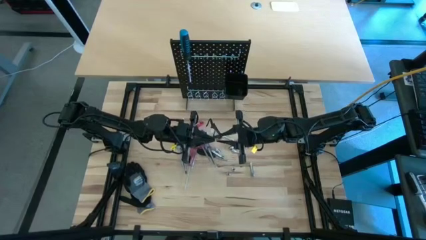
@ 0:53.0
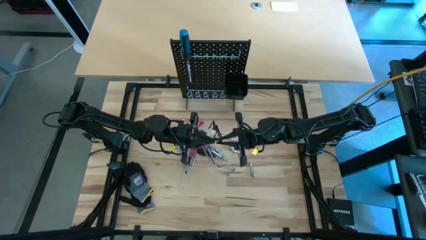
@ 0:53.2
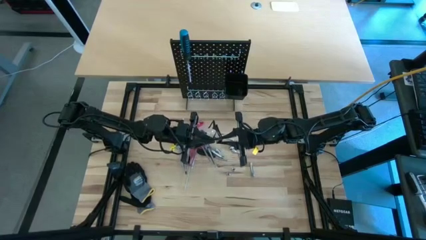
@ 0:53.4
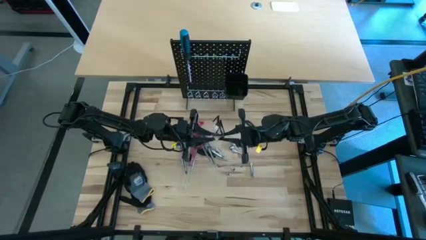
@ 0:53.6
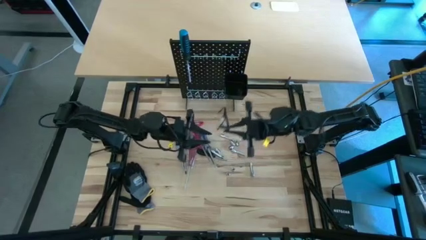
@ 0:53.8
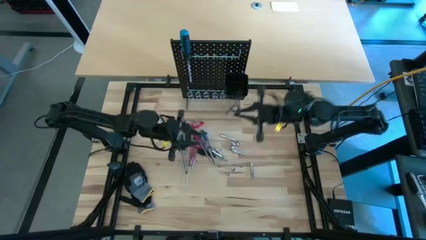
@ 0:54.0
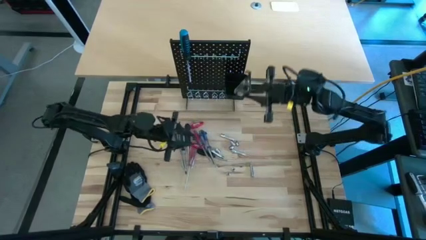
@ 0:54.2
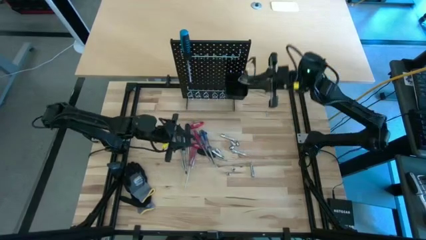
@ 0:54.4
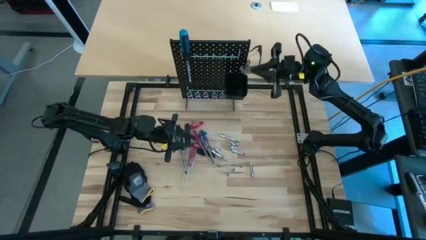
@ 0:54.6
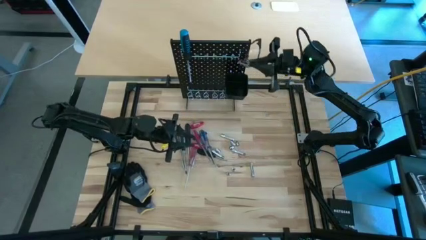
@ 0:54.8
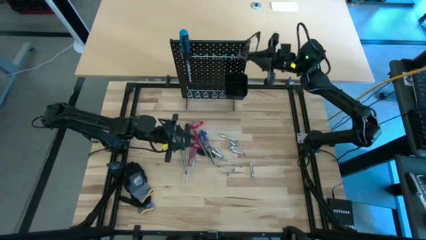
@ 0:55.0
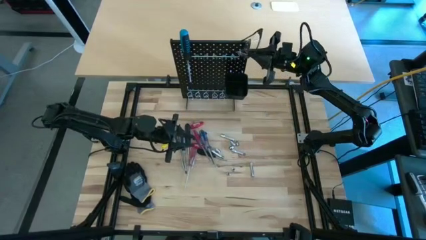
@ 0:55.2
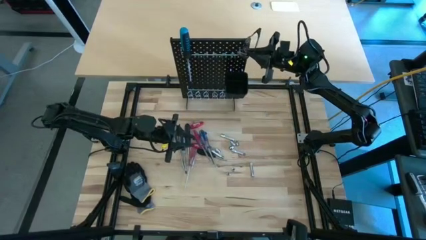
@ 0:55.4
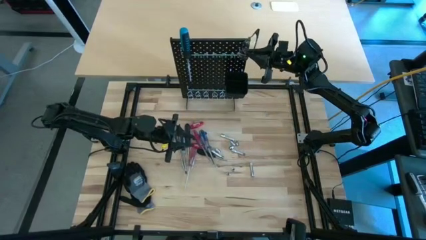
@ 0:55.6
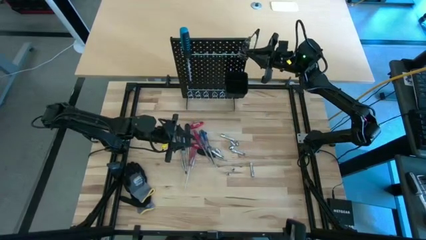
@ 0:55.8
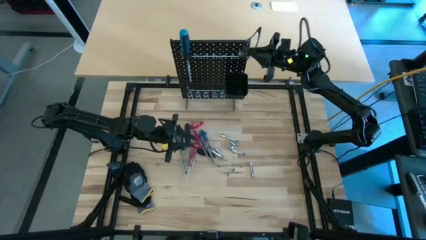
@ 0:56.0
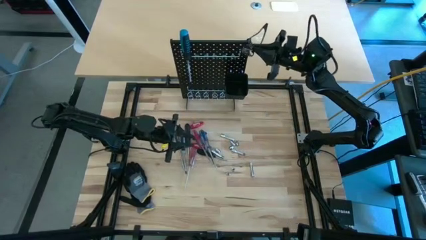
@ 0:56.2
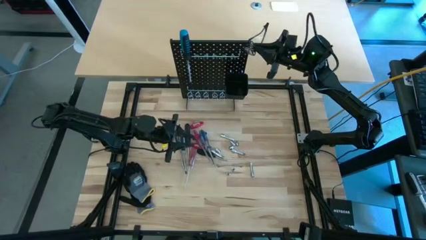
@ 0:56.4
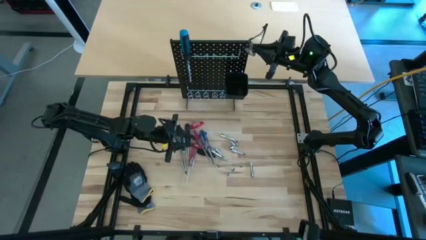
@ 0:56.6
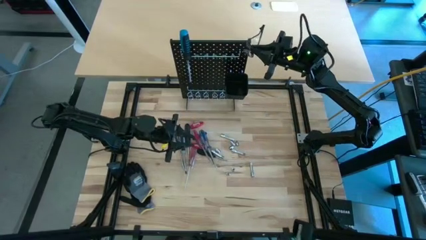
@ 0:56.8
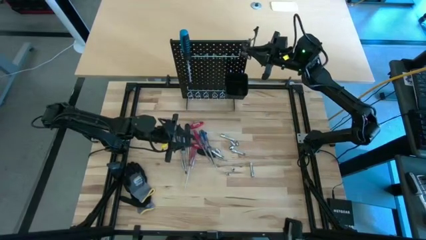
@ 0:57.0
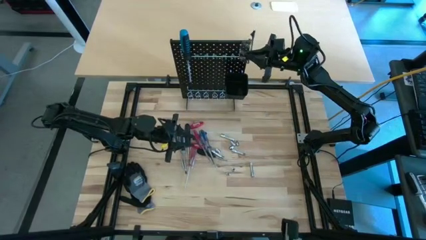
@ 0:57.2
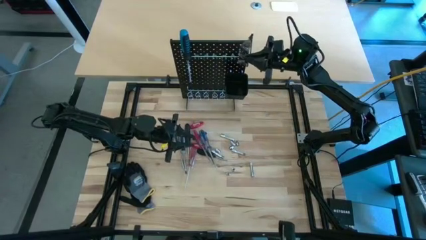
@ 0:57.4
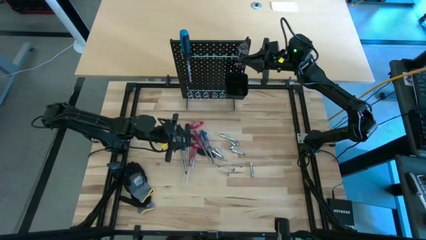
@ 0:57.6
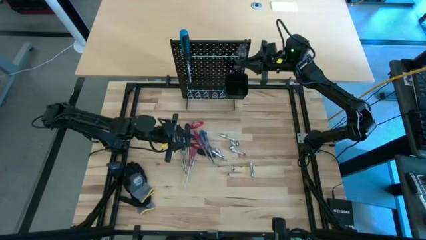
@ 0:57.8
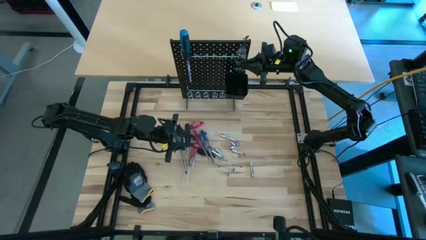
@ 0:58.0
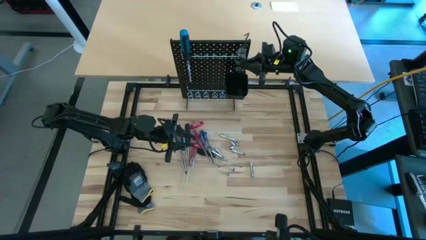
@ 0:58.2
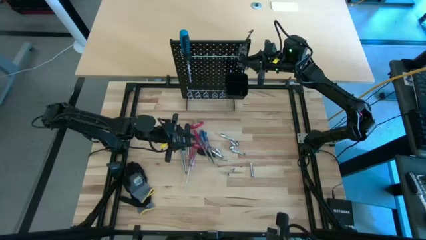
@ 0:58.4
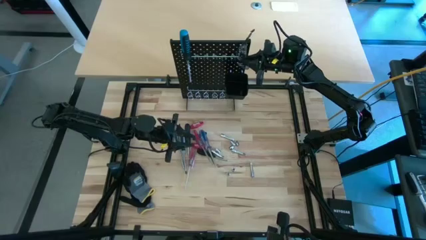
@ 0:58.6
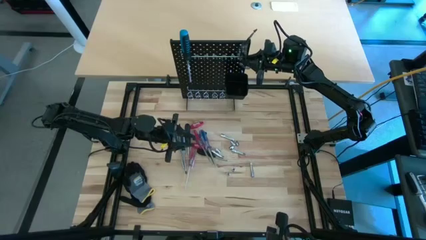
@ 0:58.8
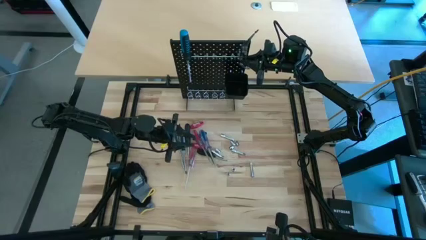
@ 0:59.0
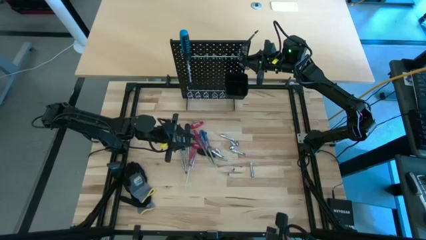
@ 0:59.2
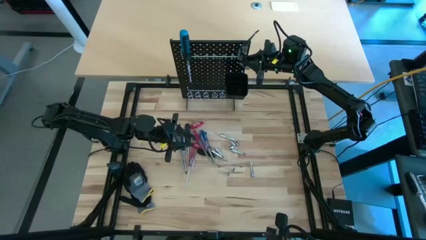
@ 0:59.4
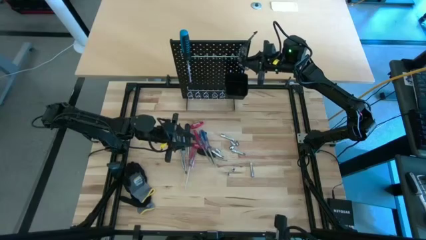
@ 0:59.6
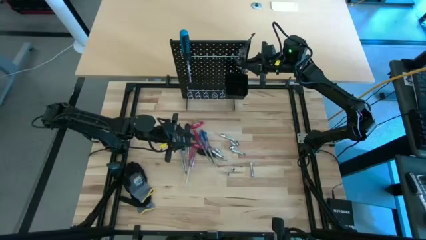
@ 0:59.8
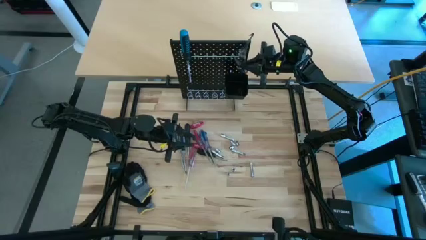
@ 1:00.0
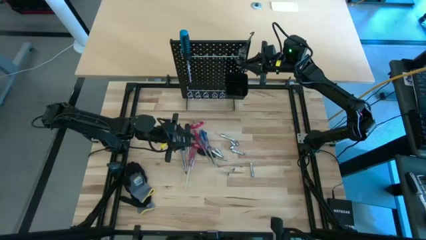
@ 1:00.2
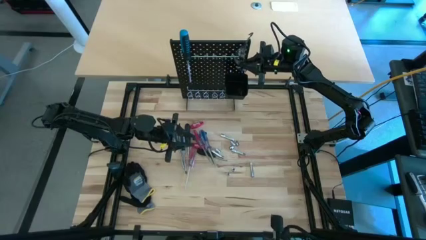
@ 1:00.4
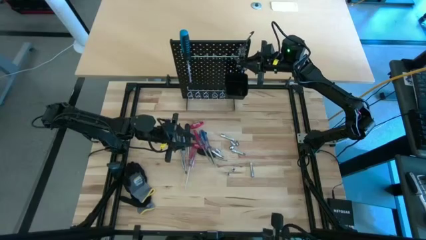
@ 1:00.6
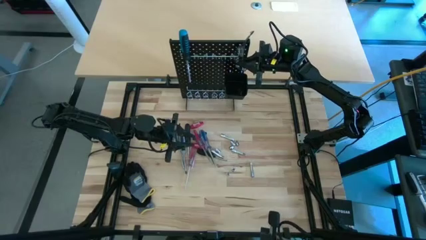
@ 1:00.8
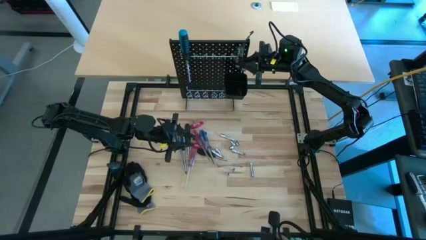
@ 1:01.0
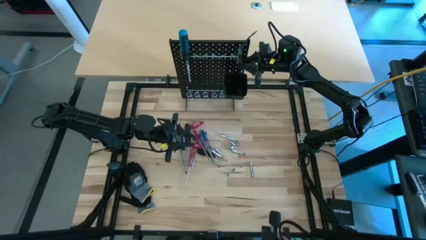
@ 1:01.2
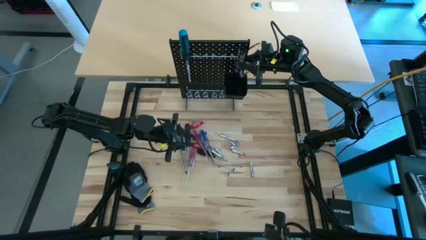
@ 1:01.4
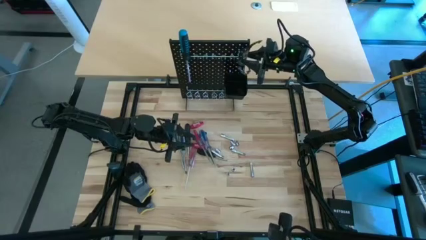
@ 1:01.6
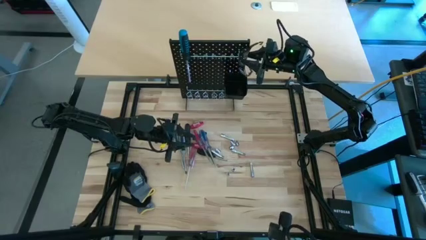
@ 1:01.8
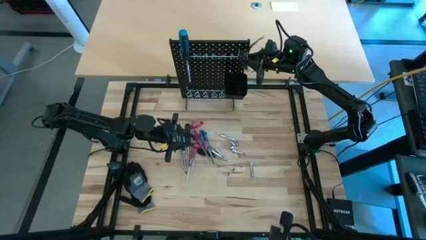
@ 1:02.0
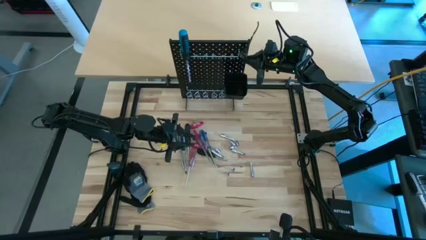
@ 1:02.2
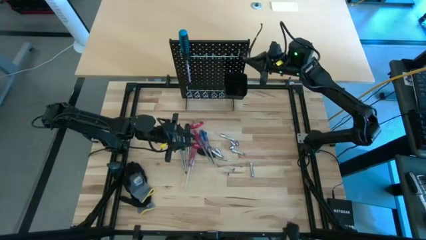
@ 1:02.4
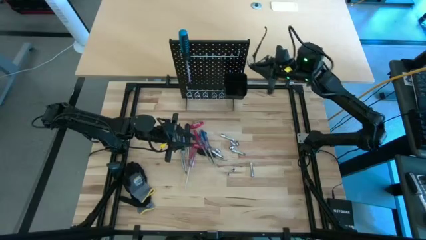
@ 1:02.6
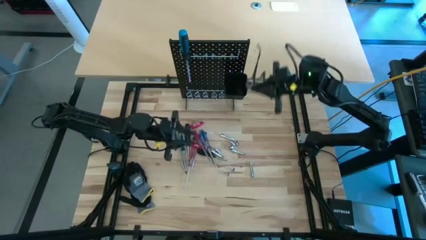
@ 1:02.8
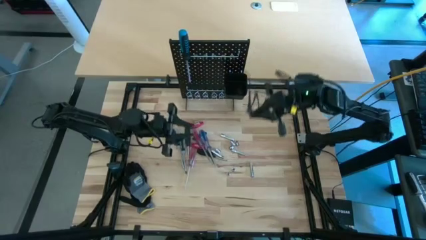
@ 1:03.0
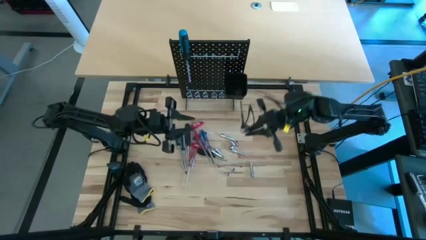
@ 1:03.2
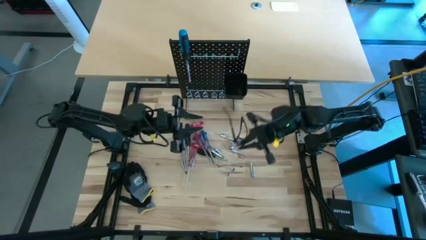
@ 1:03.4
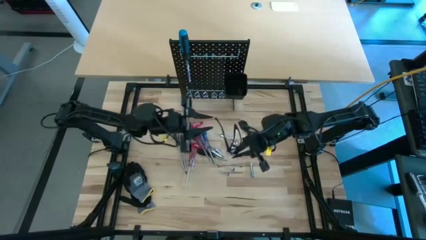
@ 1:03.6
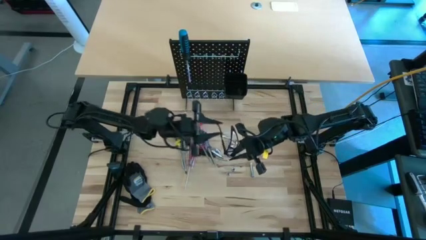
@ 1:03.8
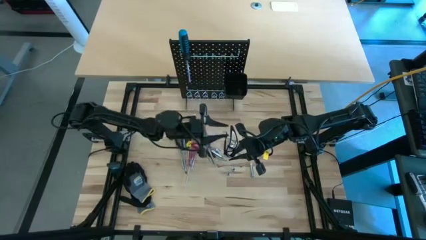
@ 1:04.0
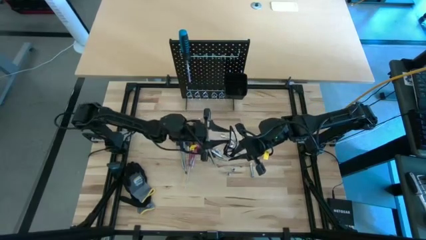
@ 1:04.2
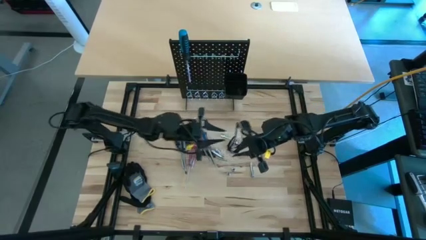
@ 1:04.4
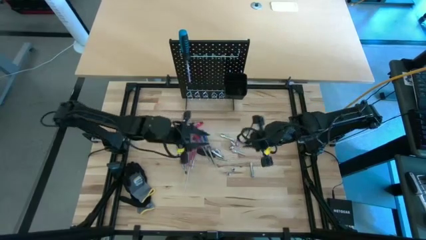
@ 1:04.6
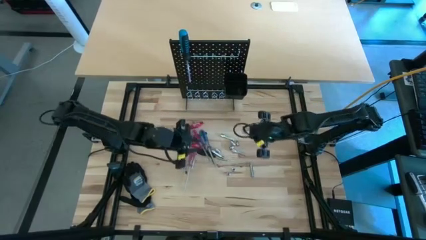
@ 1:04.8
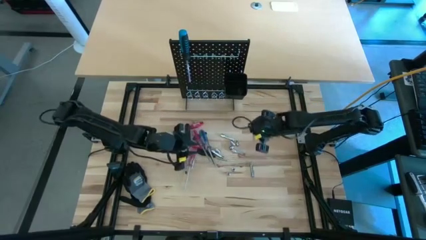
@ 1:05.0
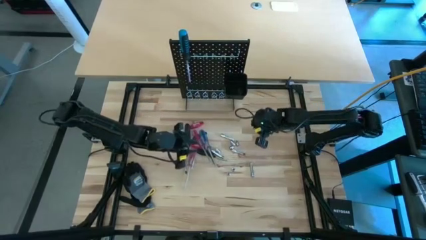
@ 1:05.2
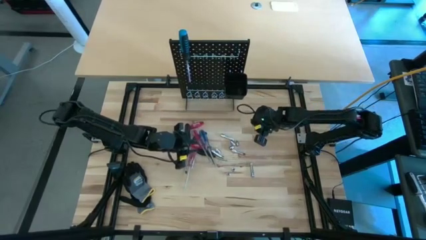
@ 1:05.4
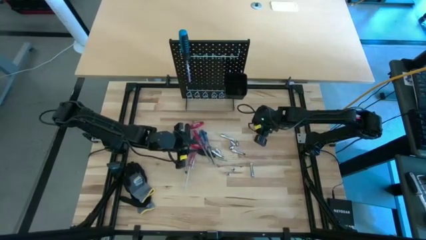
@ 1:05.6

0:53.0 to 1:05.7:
Task: Hang tools onto peg board
Hang the black safety goggles on the peg board

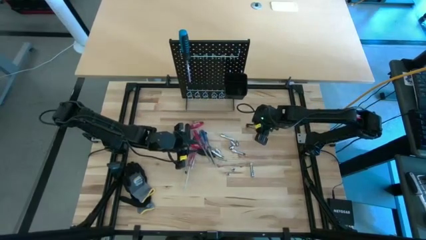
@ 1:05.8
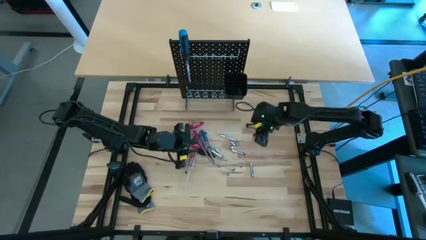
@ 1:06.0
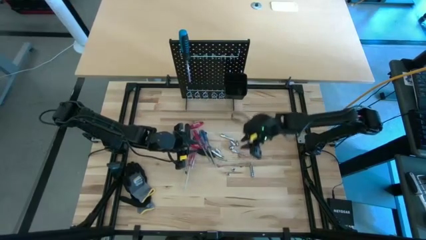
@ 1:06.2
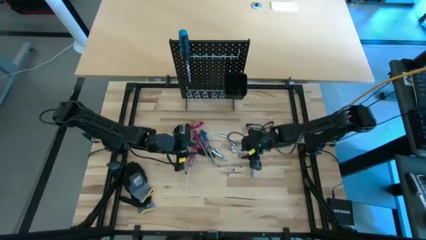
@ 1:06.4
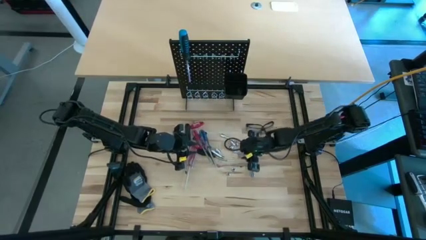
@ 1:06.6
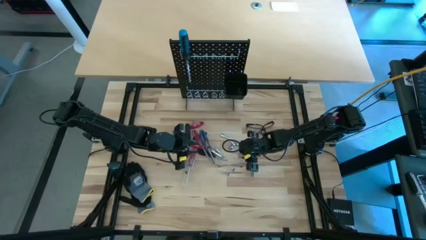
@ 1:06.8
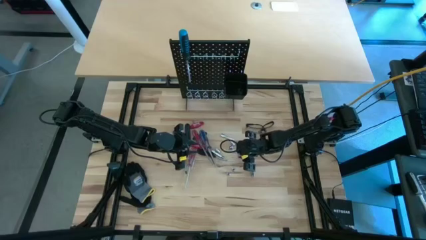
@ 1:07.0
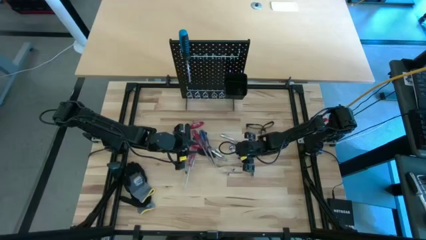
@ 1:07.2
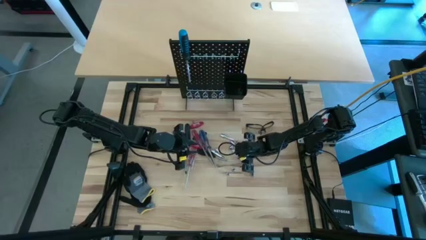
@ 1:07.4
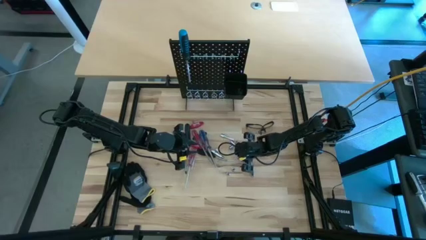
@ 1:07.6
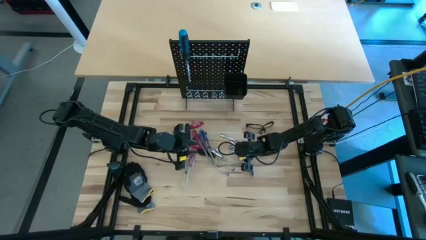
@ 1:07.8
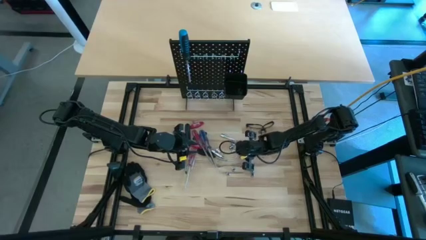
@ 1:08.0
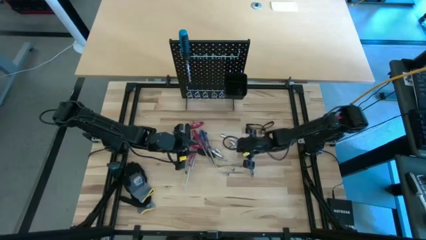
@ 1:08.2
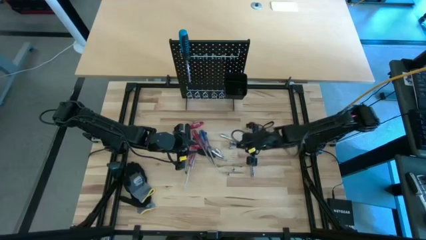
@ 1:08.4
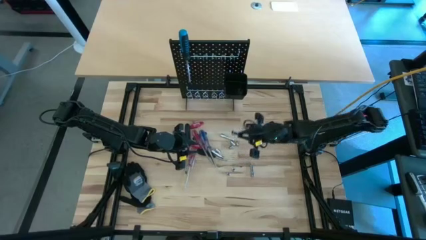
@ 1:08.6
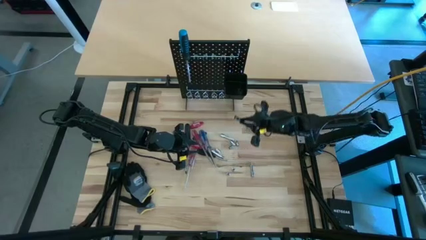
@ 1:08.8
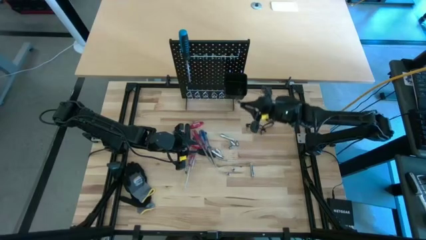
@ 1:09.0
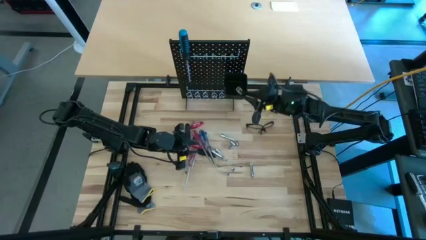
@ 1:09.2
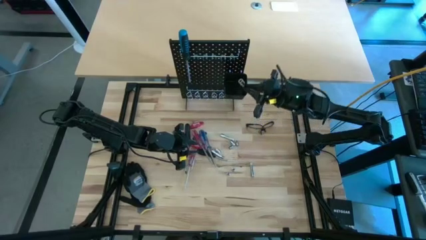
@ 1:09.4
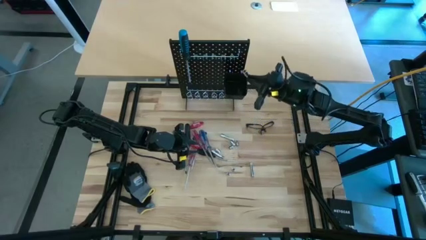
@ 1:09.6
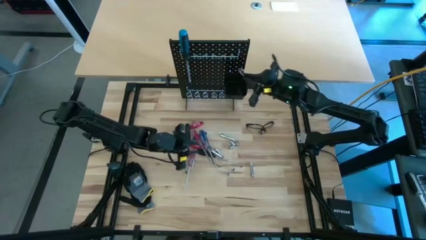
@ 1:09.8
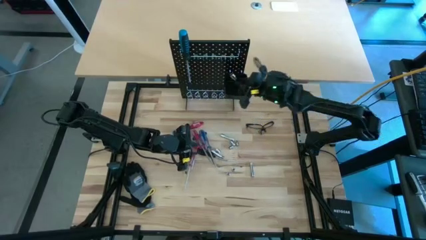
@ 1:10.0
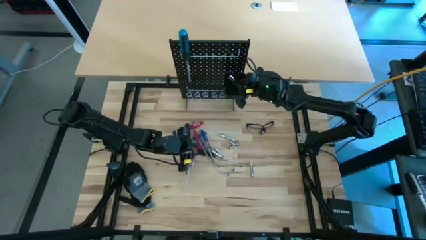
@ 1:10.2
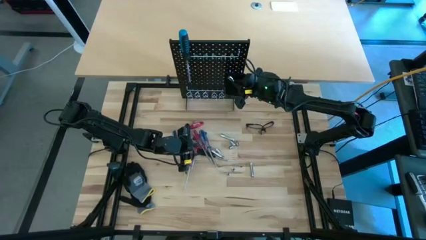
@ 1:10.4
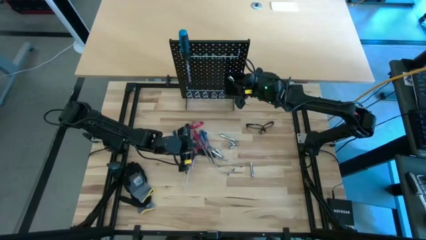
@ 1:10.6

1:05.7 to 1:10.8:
Put the silver extension bar into the black bin on the peg board
